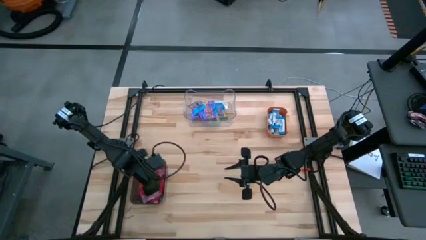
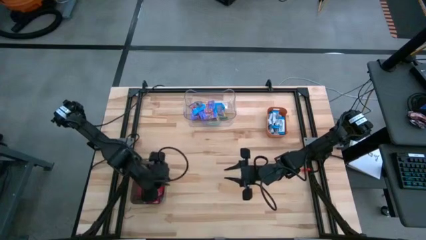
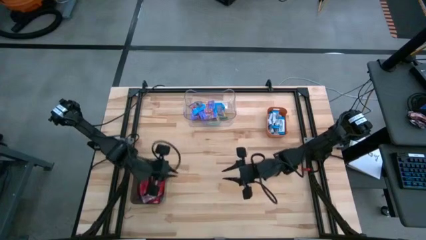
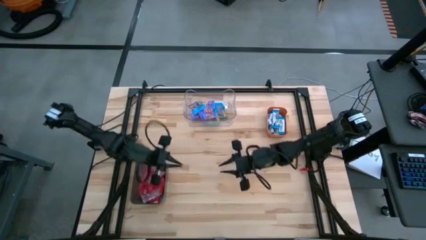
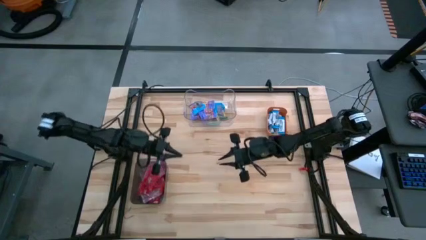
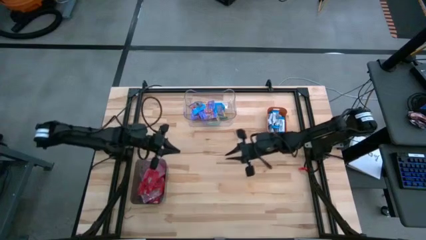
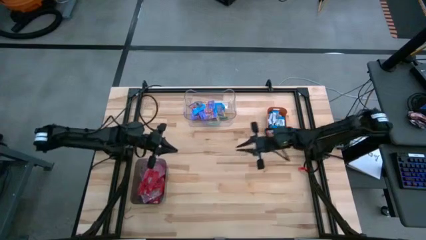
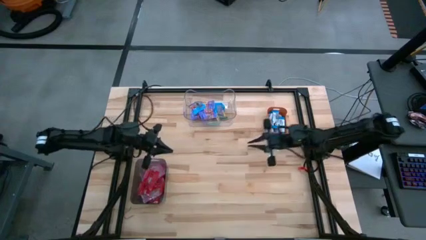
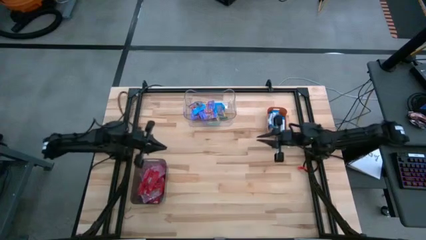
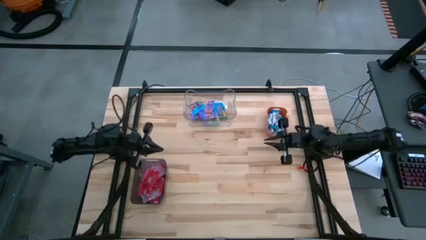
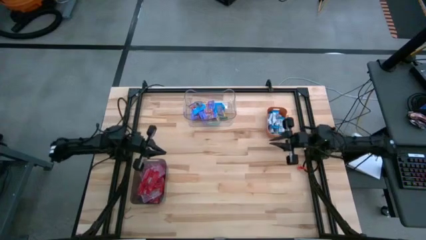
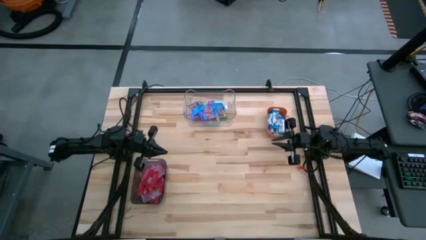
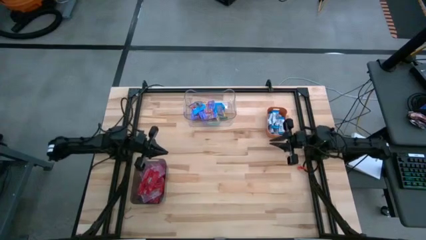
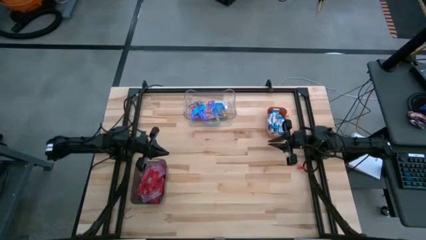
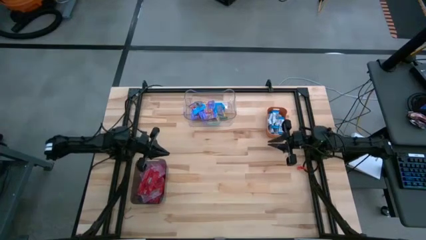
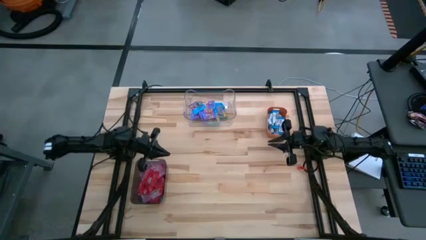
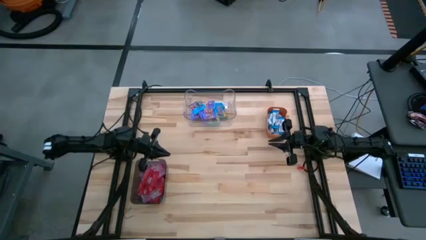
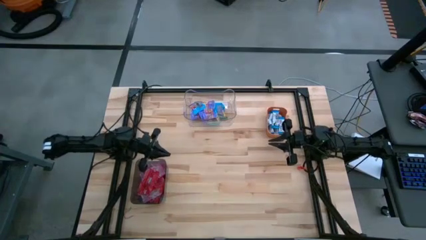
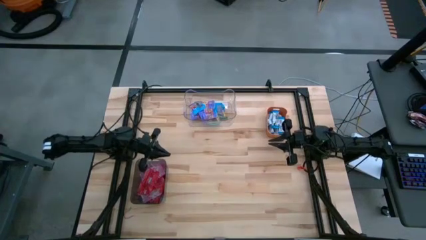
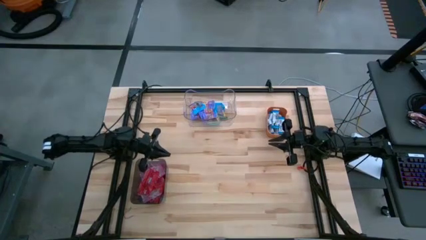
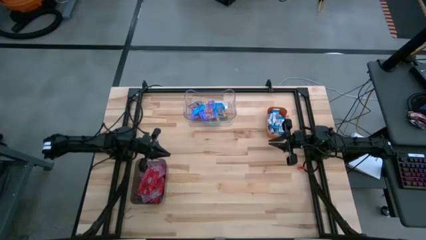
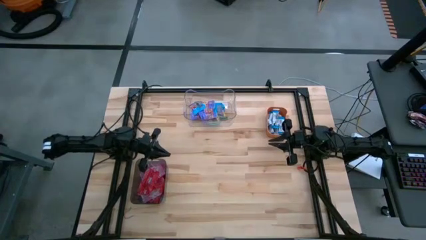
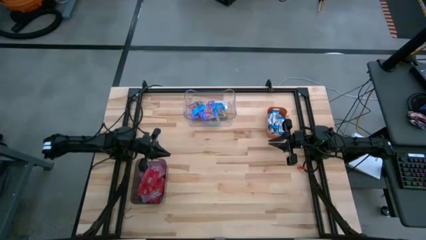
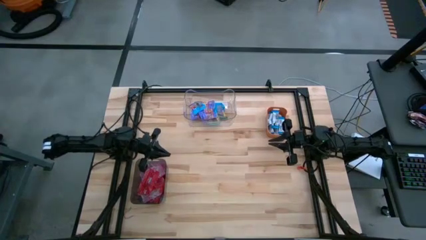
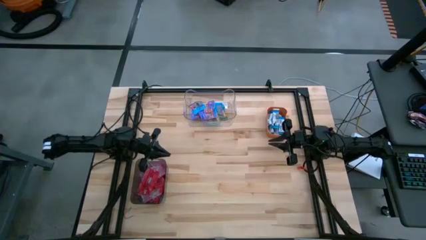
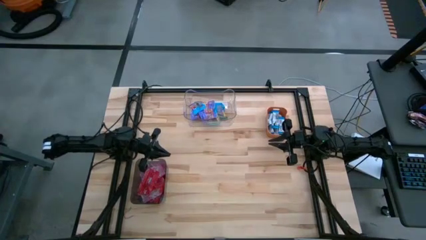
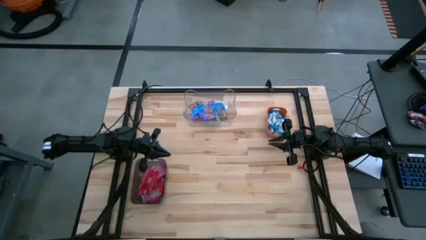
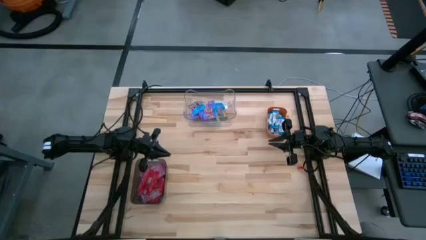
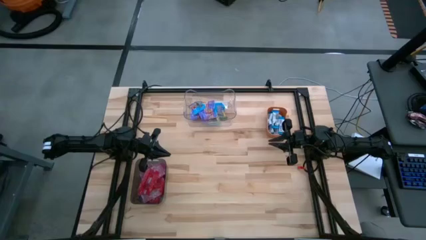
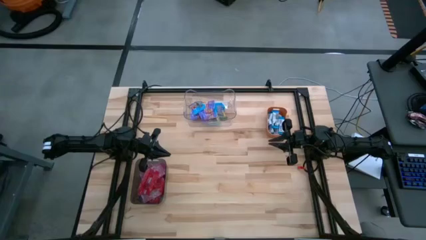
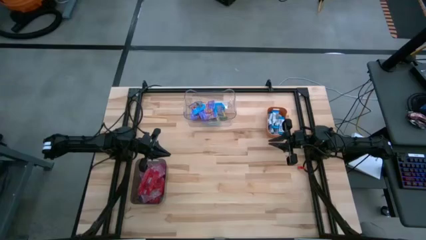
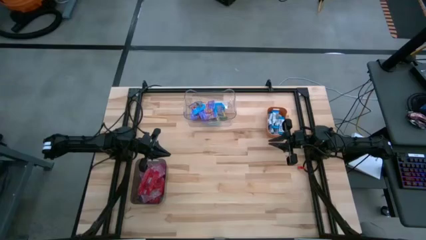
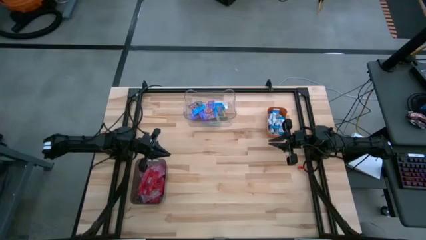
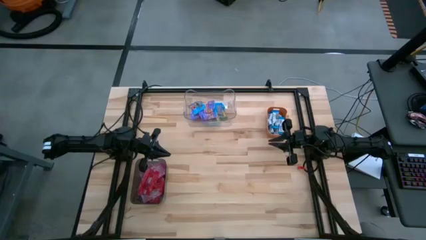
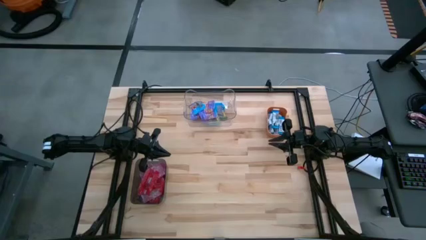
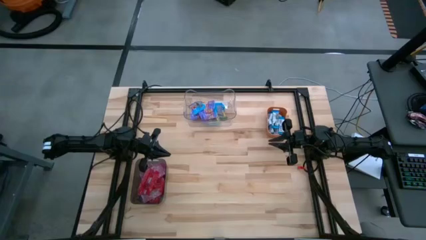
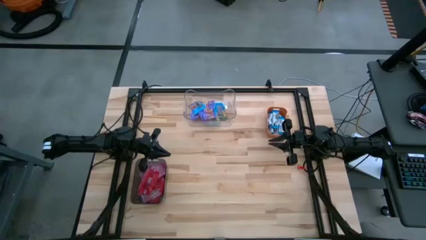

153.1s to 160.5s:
Task: Sort candy
Return to Home Position

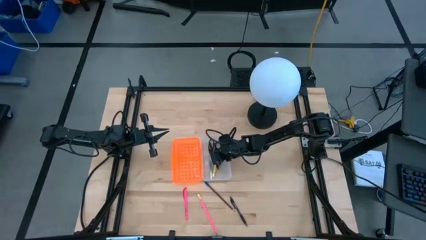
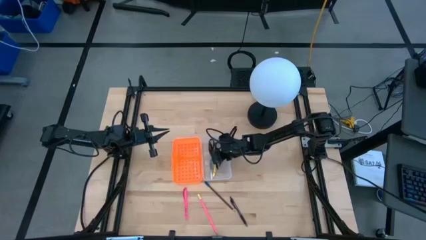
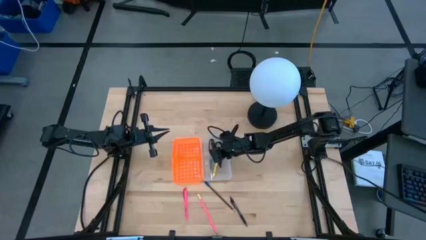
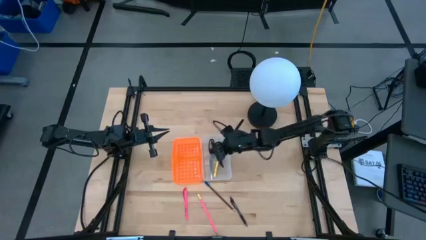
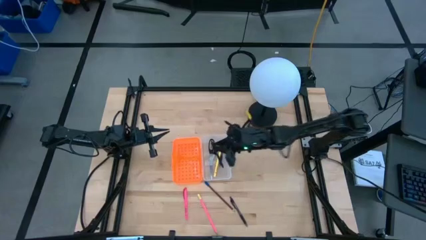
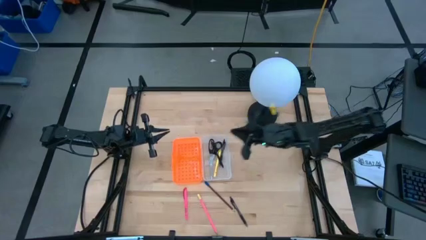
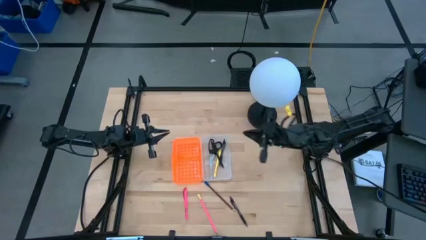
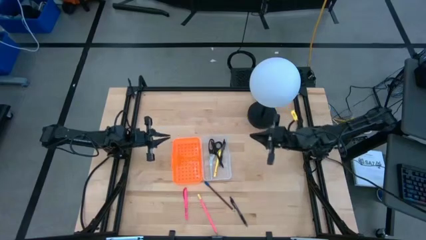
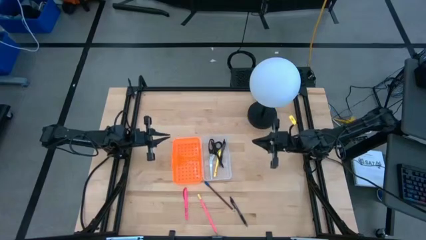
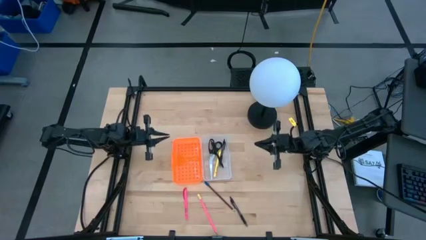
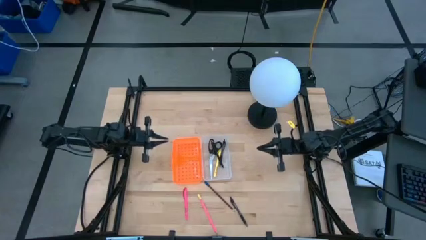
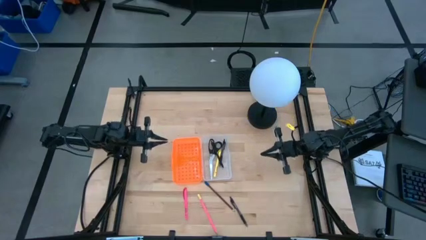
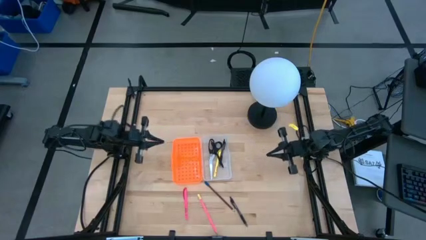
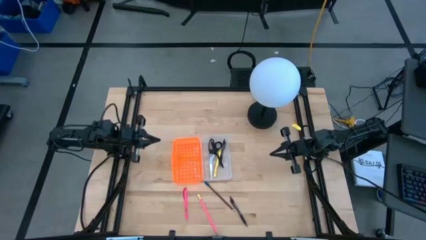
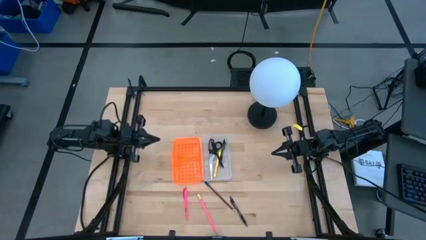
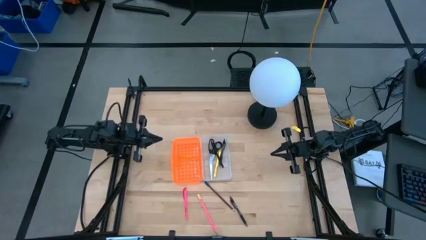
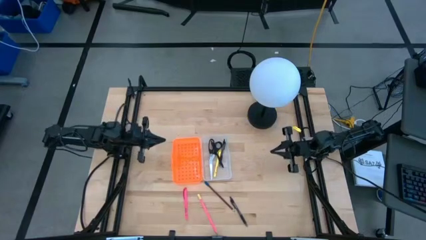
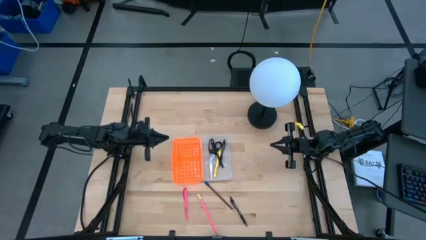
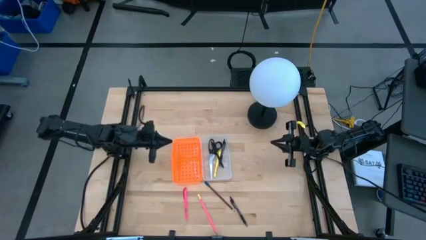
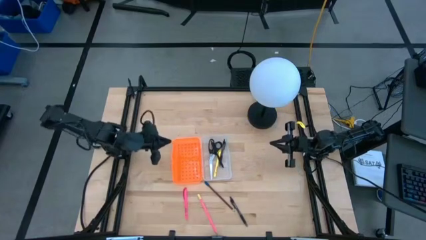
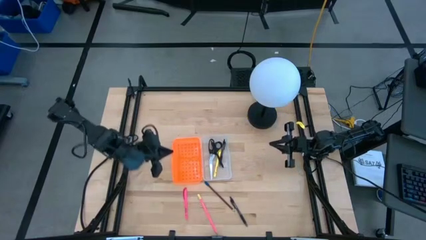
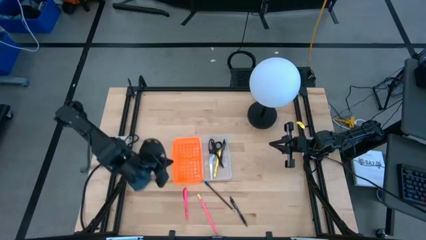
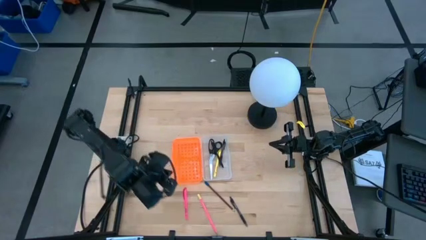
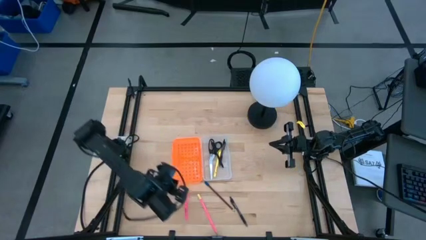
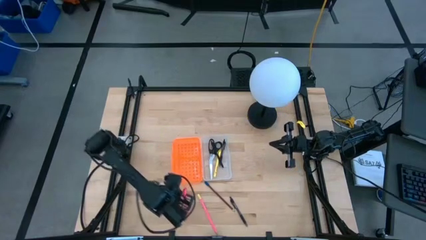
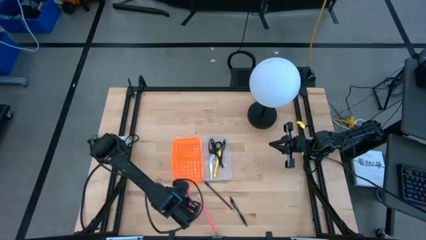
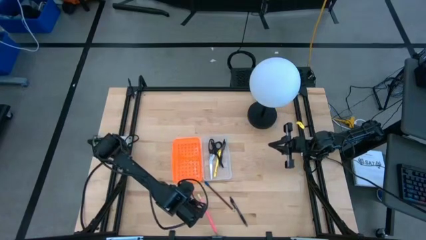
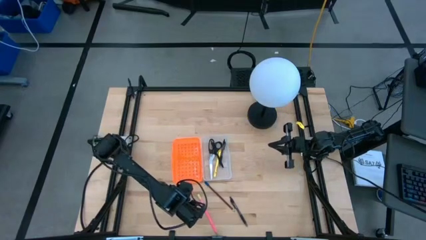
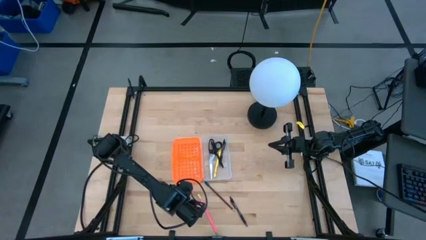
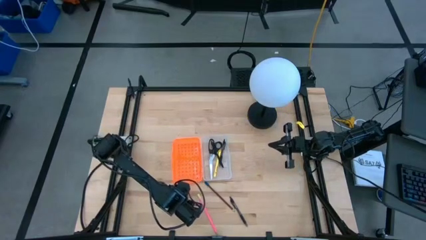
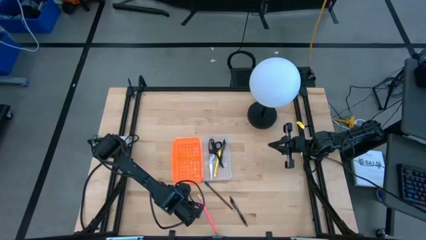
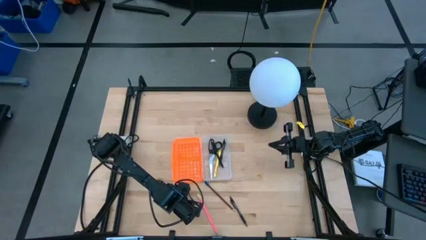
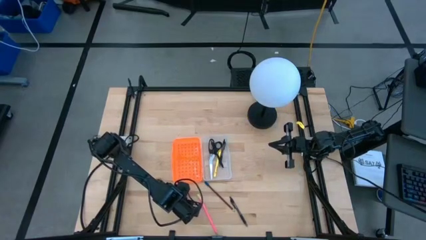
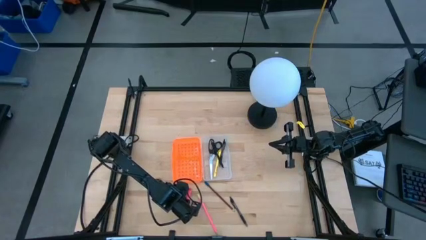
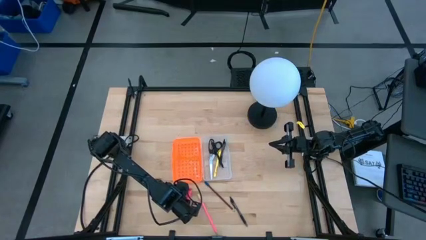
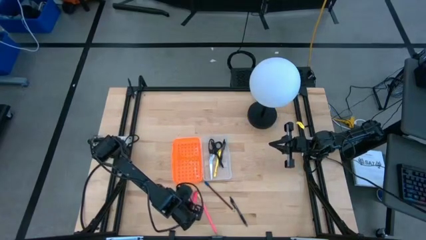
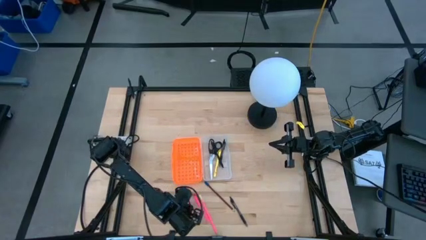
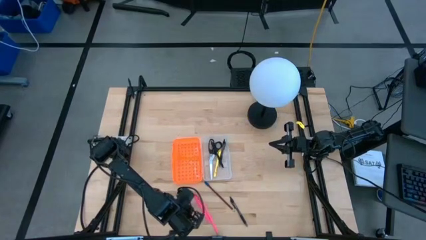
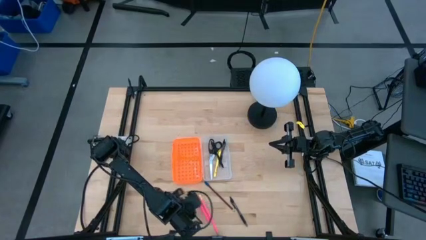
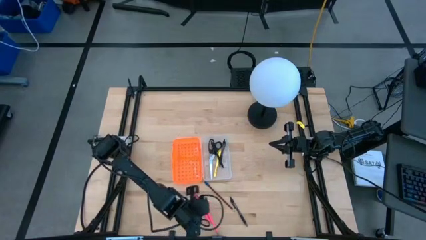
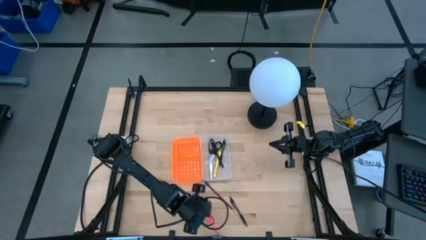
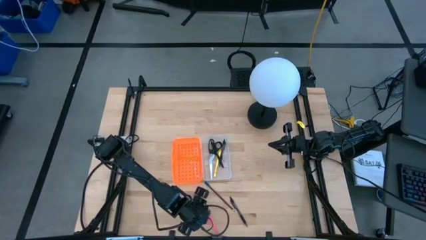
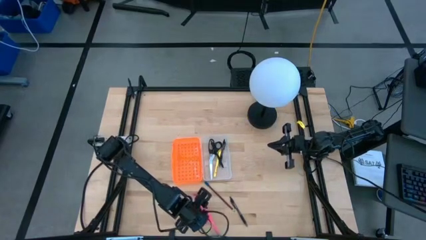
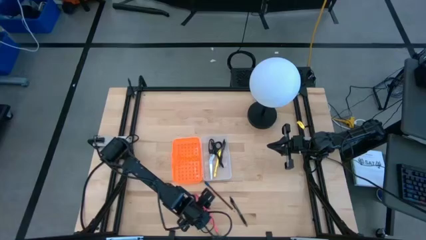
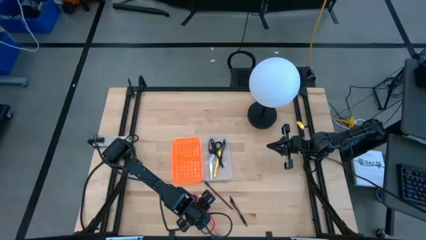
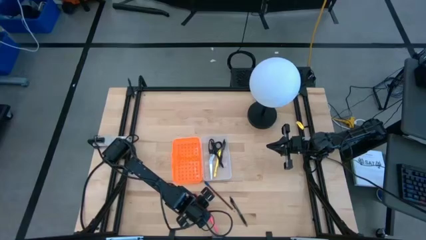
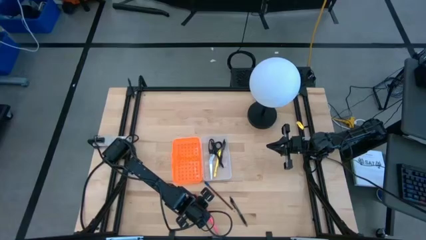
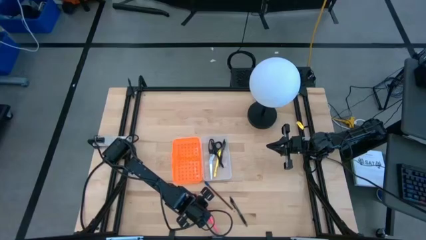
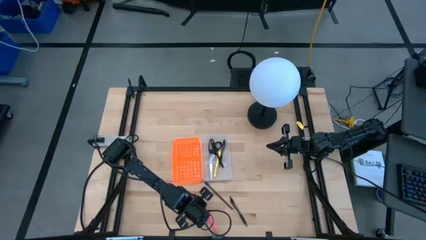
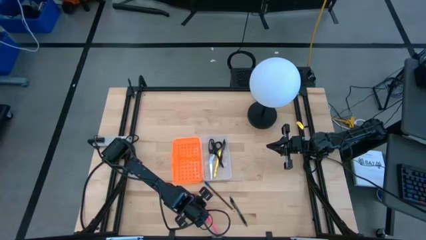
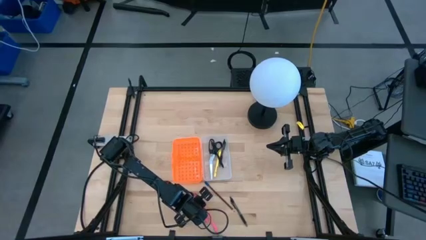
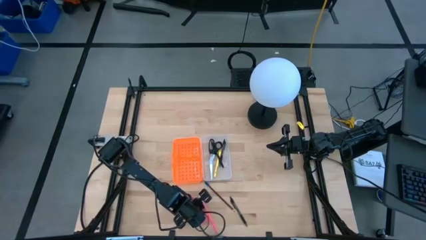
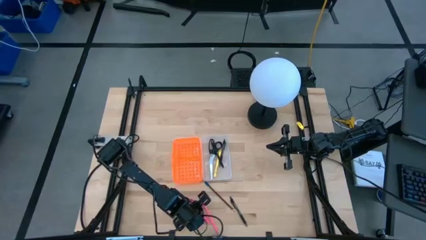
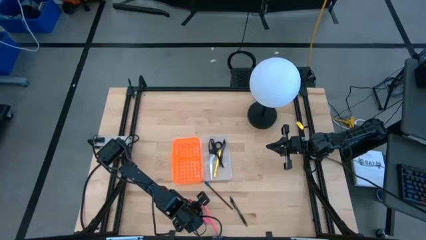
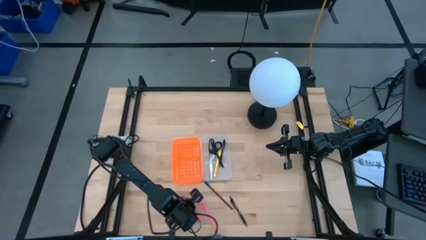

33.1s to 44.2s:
Task: Pick & place school supplies into a supply box
Put the pink pen into the supply box
